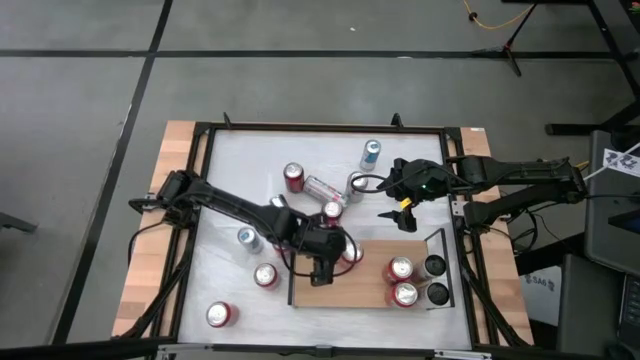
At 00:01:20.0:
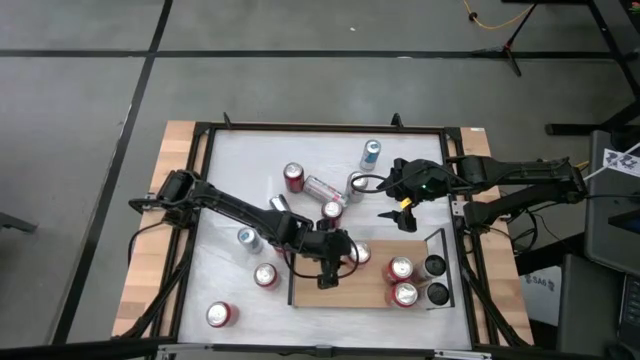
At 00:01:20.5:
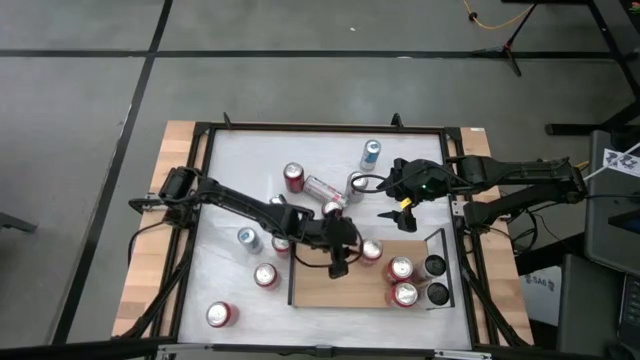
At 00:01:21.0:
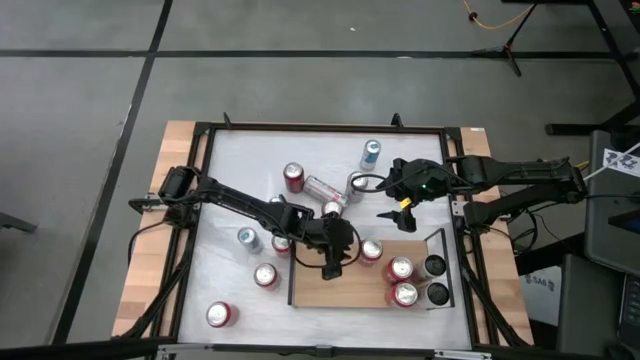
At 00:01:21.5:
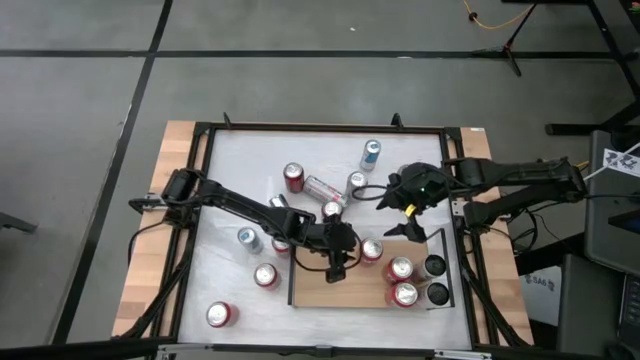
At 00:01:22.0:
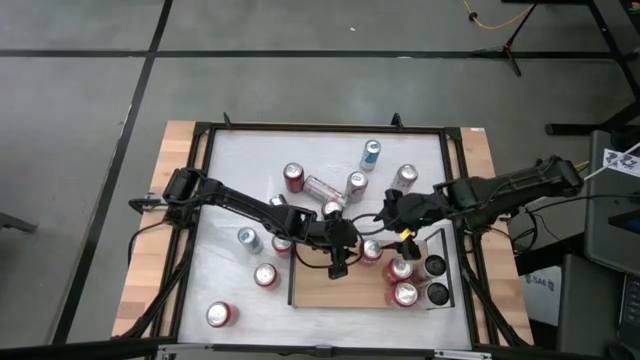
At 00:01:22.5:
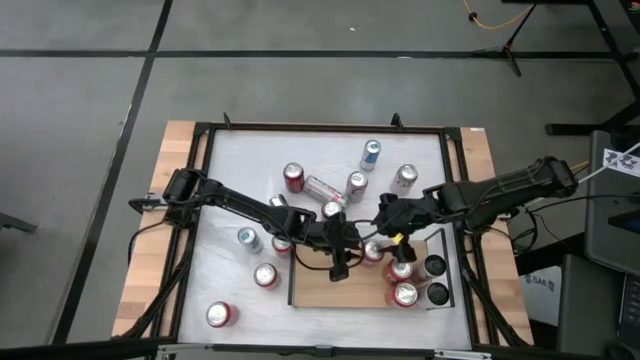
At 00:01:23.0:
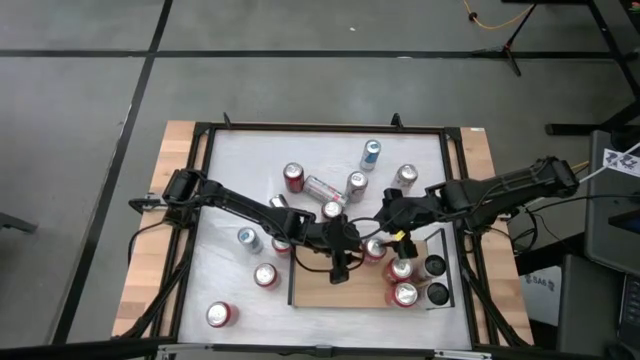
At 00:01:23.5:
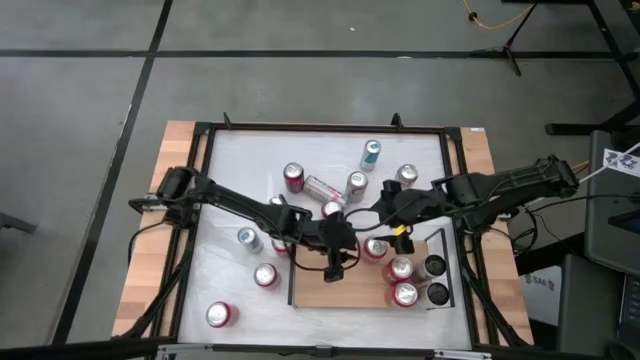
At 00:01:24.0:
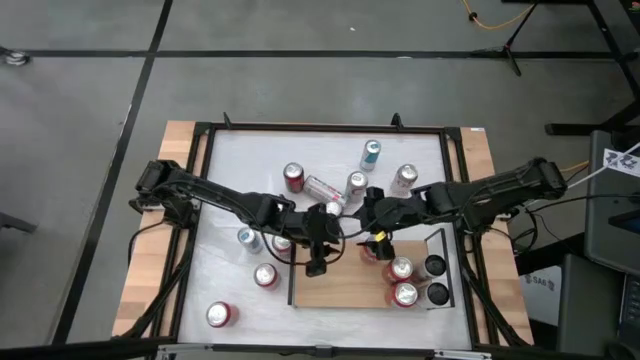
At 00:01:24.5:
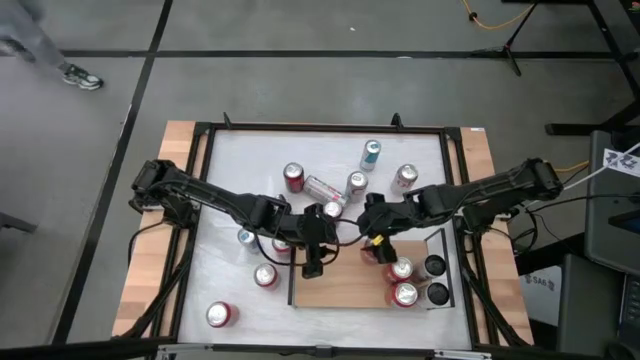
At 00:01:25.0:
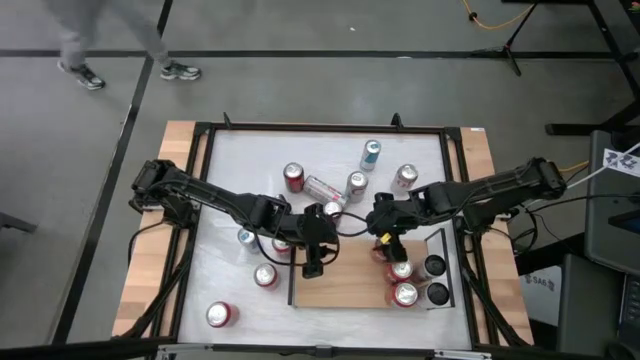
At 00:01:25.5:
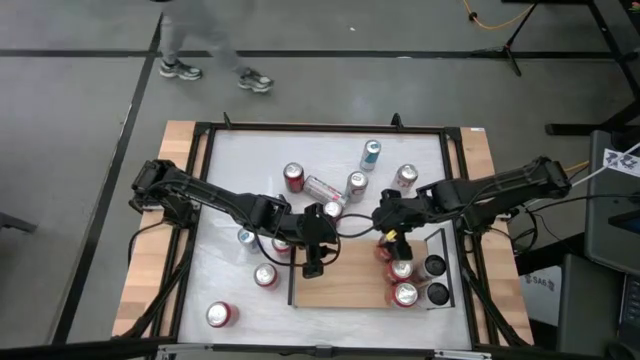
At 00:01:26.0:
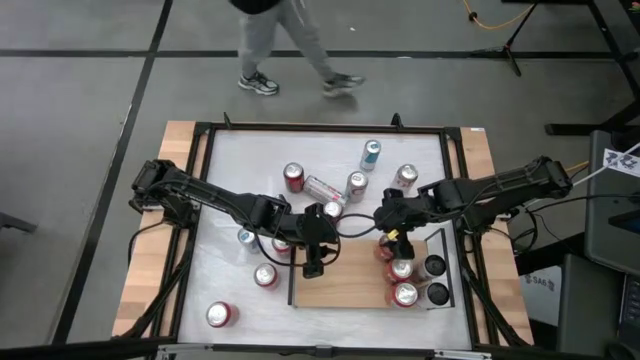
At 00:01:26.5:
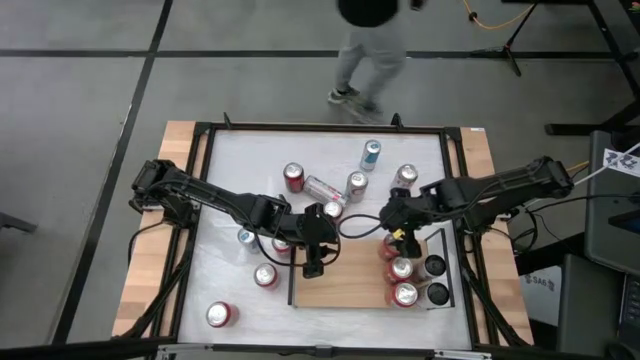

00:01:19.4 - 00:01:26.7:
Task: Place canned beverage on shelf
Adjust the top left orange soda can on the shelf

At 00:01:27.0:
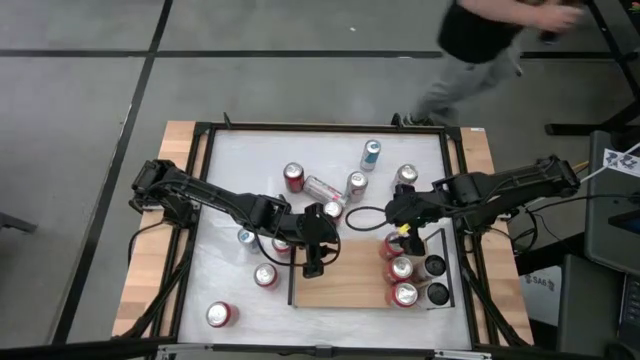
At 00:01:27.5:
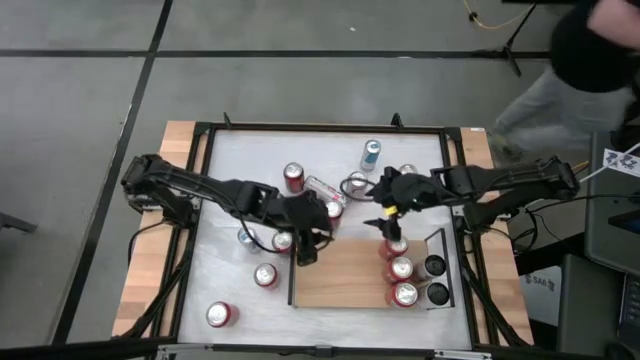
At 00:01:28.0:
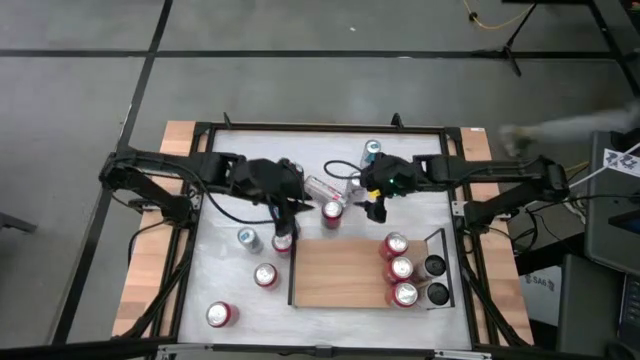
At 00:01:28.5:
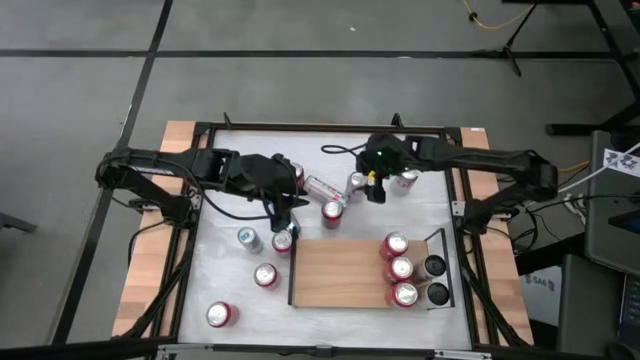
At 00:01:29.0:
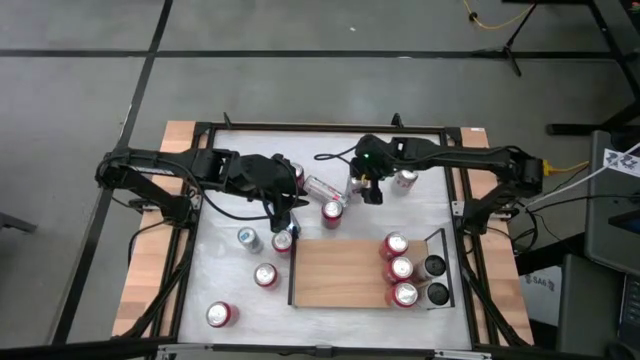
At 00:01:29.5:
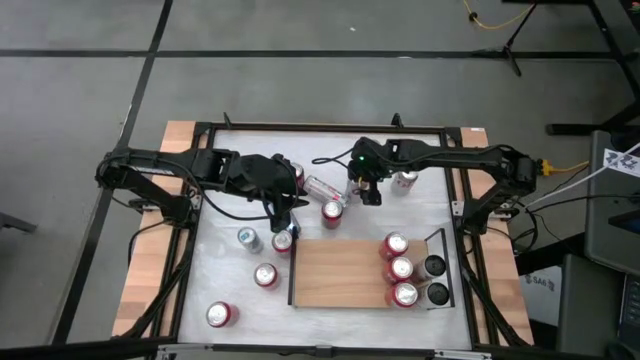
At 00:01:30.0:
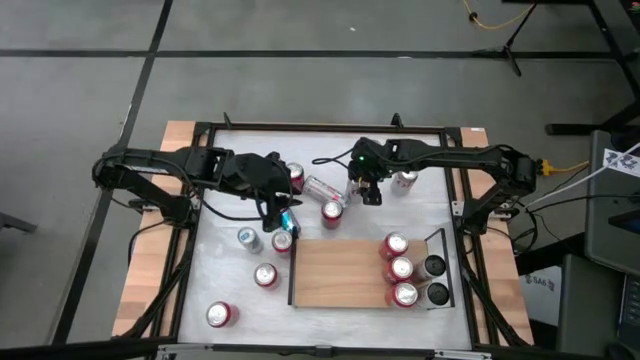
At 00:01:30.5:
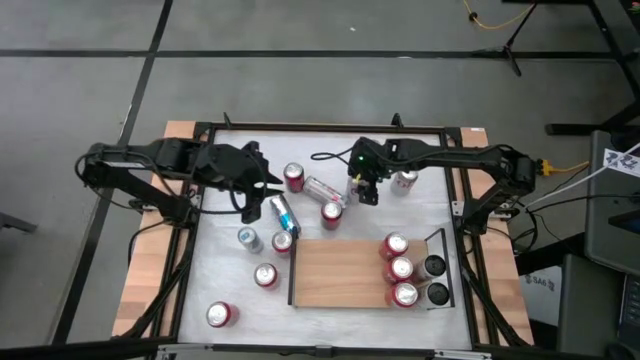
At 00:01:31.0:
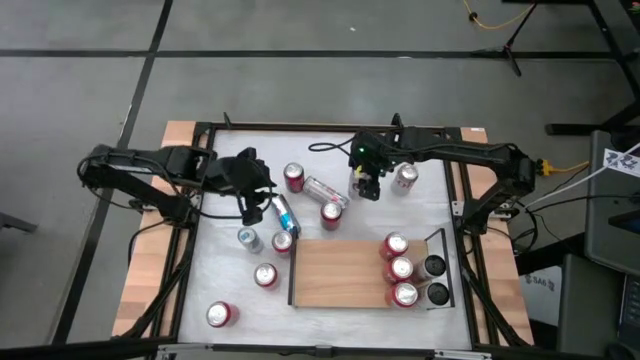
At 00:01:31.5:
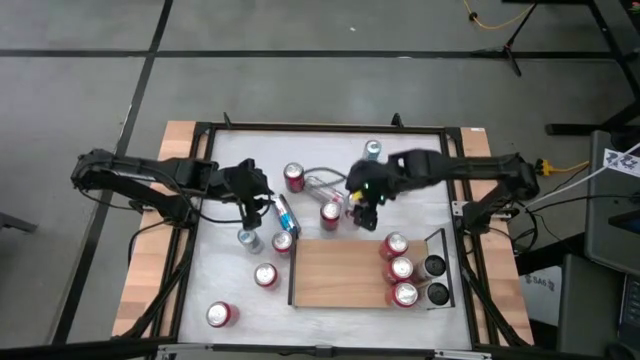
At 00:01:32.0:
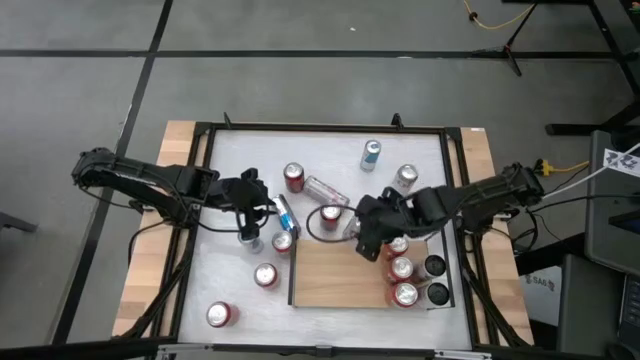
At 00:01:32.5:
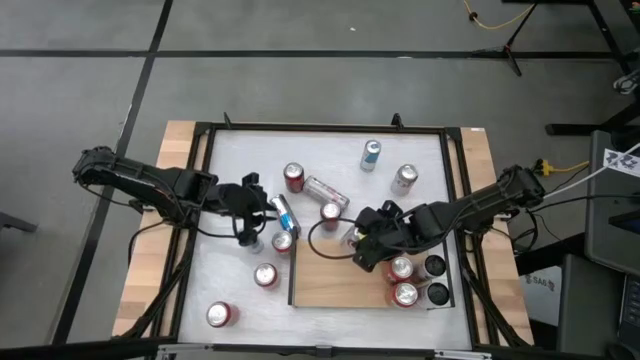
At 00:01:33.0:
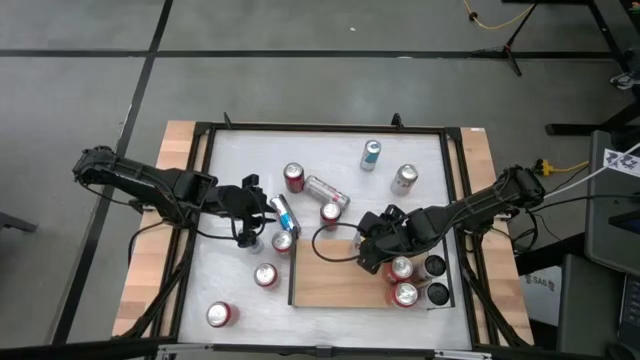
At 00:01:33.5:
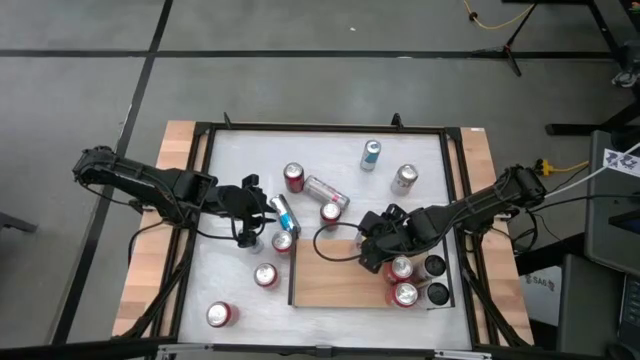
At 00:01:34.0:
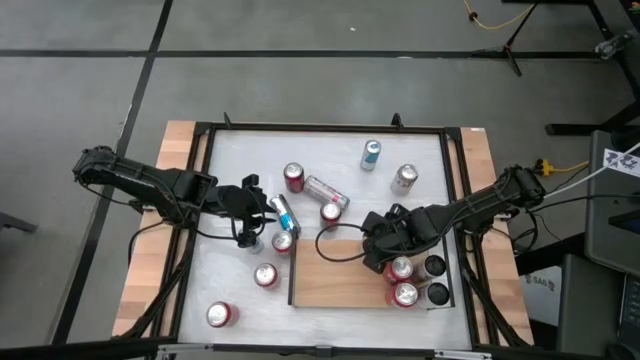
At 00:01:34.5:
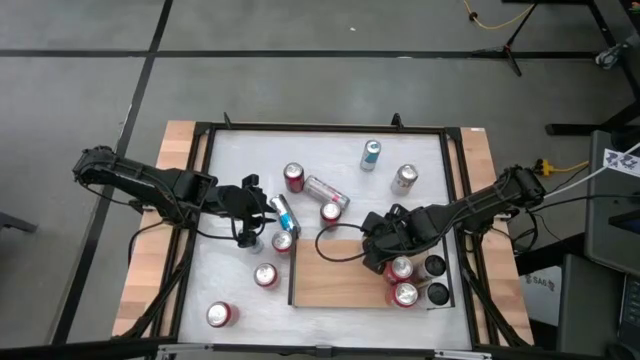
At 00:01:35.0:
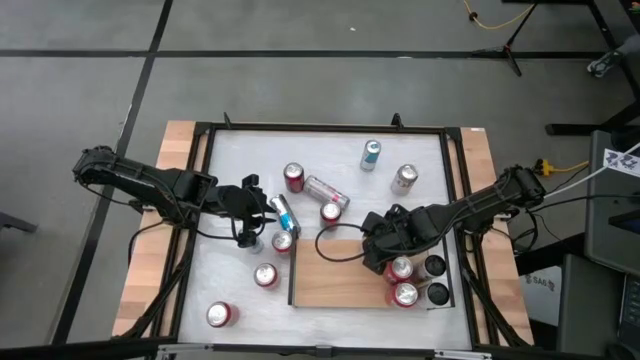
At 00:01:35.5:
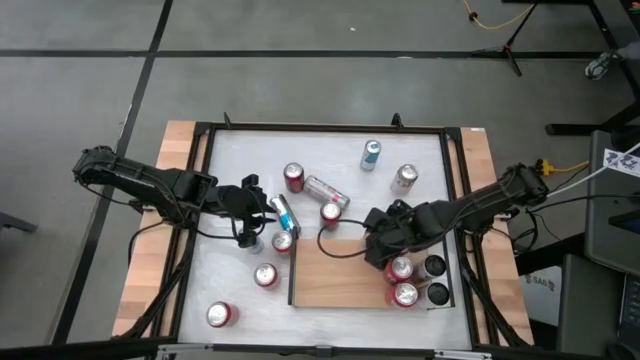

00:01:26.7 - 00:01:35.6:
Put the top center silver soda can on the shelf

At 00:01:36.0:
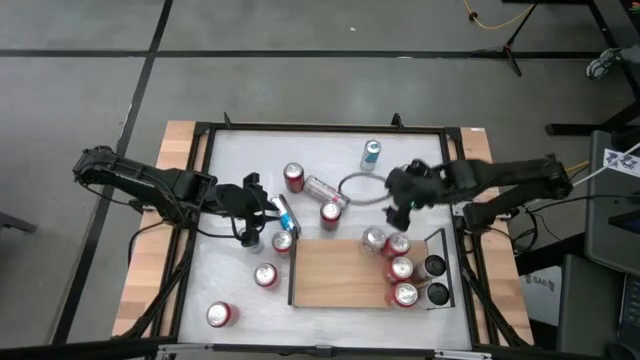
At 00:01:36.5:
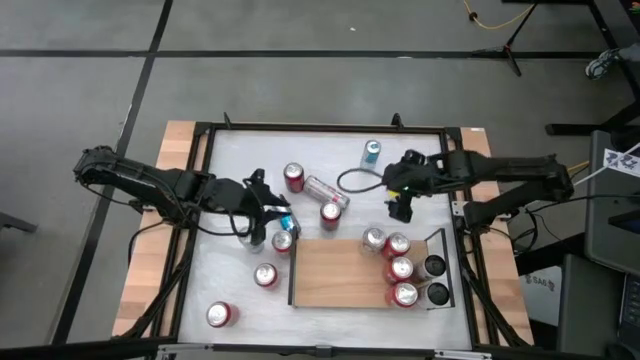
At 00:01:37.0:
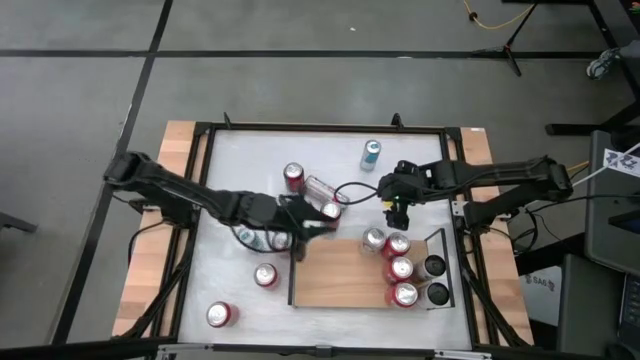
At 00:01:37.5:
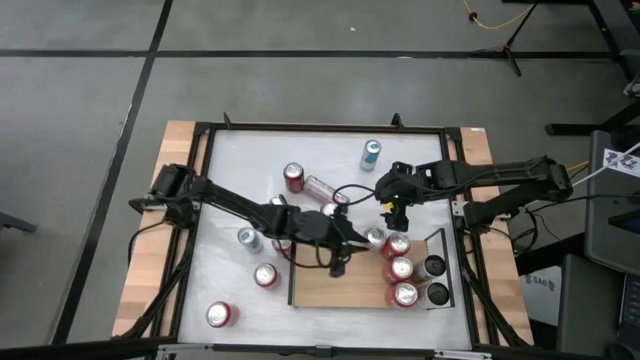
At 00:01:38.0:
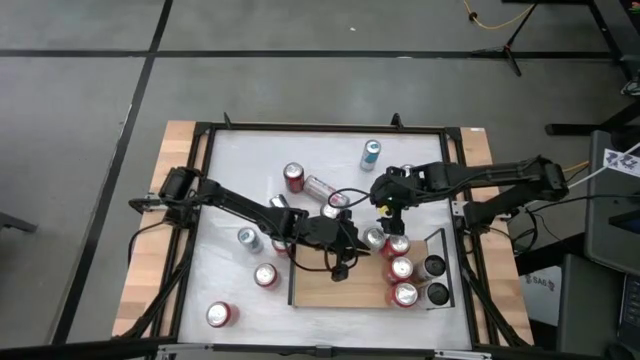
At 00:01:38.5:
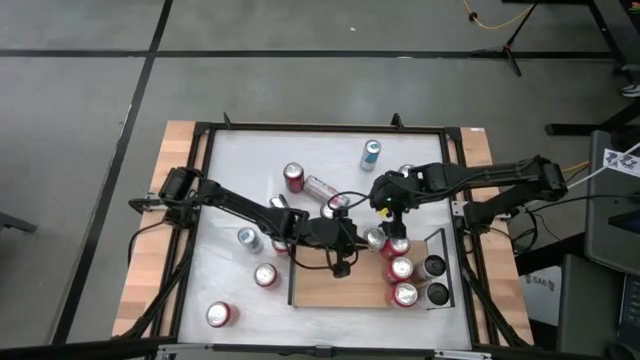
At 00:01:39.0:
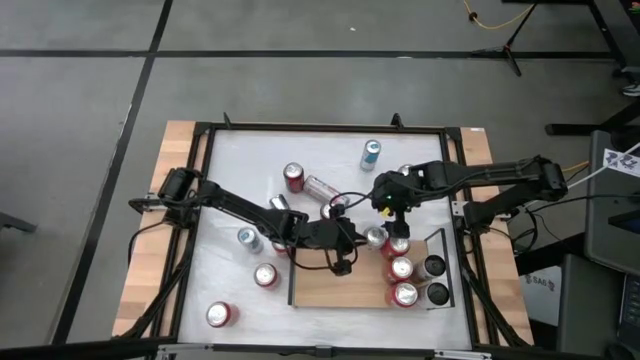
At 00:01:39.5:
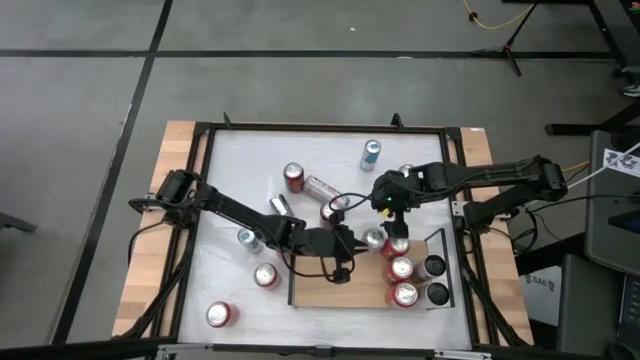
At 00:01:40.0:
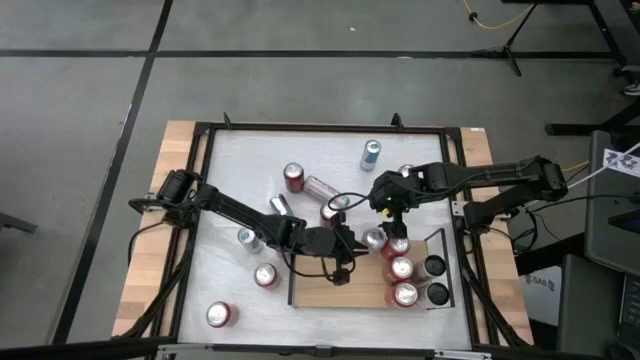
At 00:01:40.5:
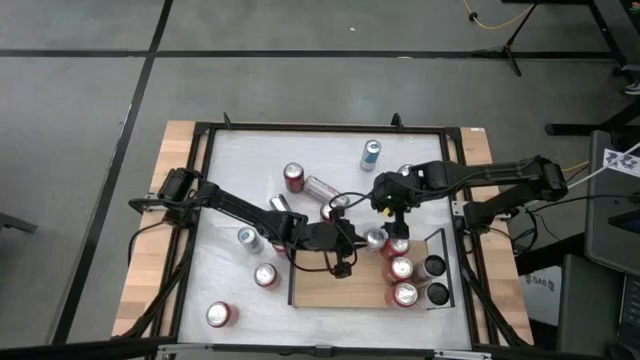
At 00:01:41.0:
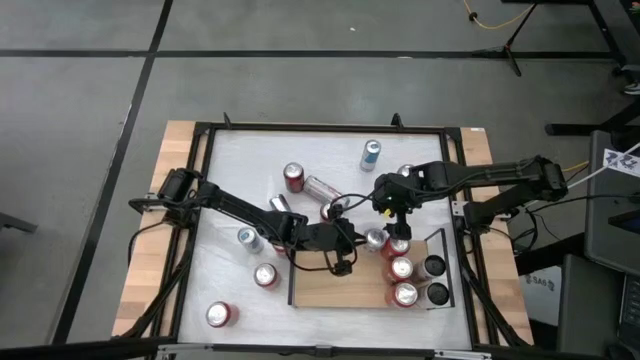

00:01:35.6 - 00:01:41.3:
Adjust the silver soda can on the shelf
